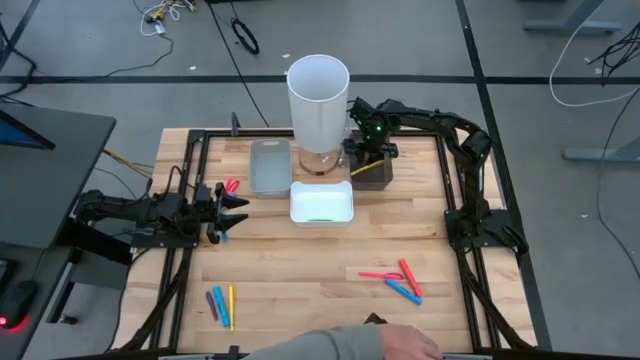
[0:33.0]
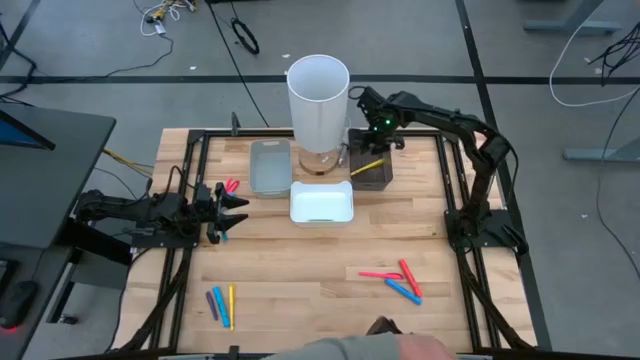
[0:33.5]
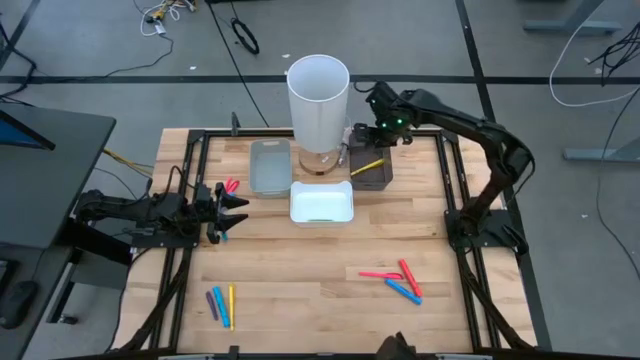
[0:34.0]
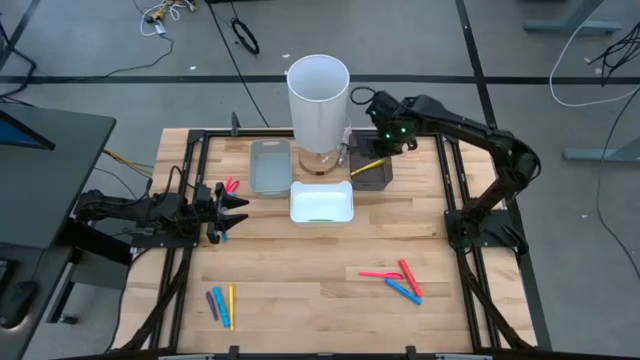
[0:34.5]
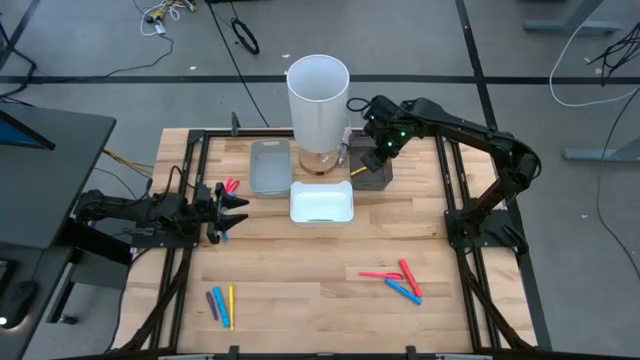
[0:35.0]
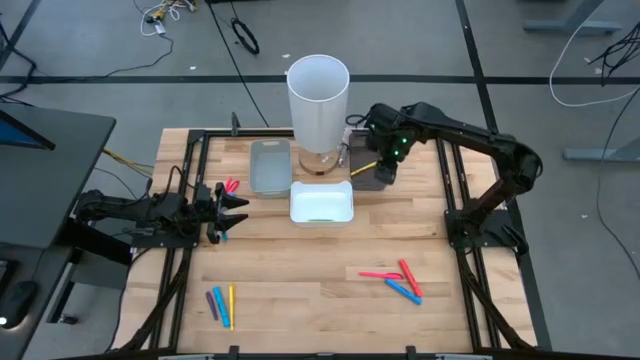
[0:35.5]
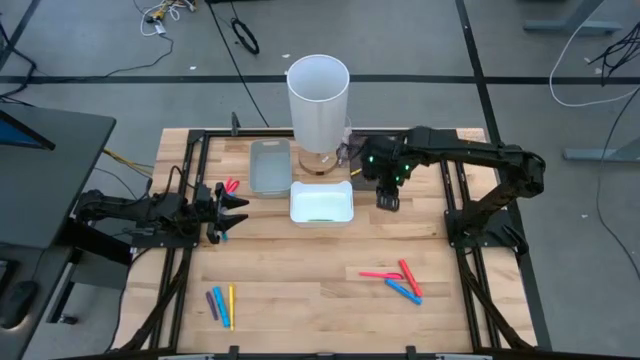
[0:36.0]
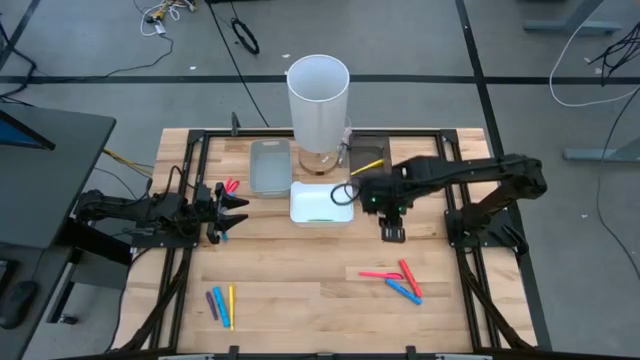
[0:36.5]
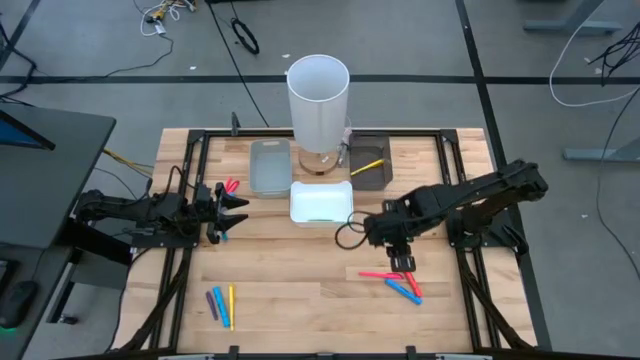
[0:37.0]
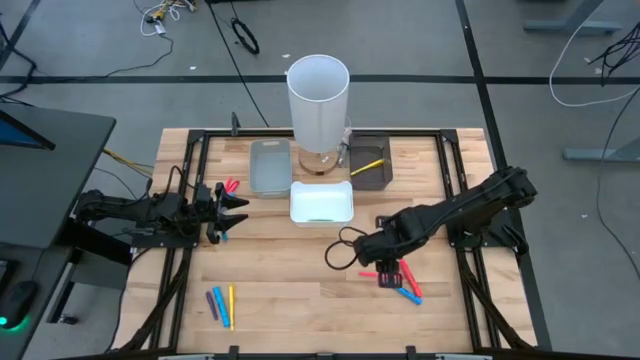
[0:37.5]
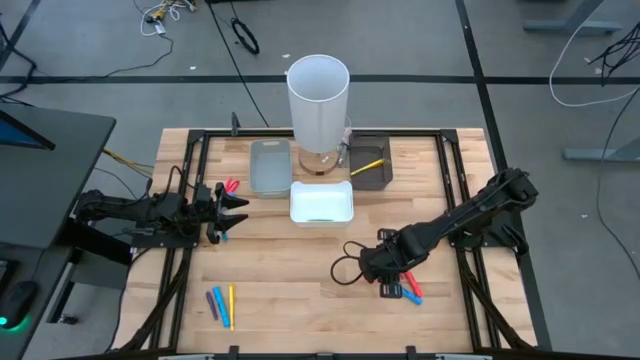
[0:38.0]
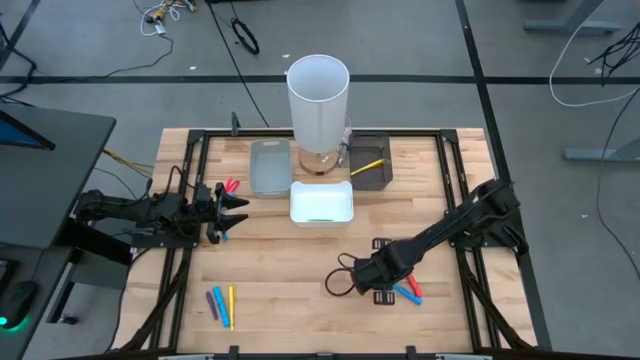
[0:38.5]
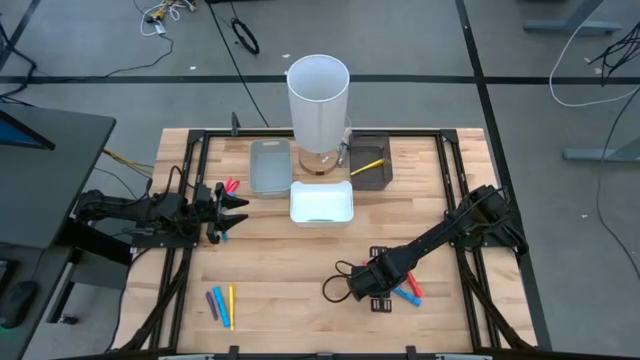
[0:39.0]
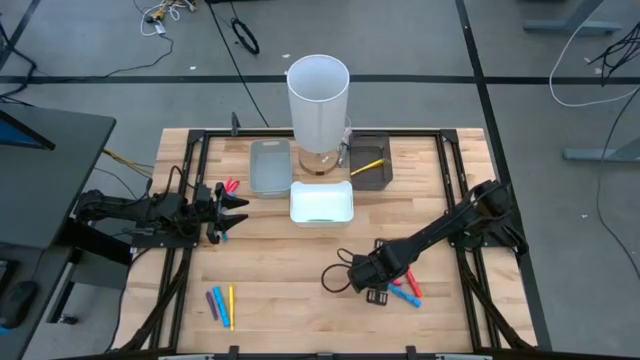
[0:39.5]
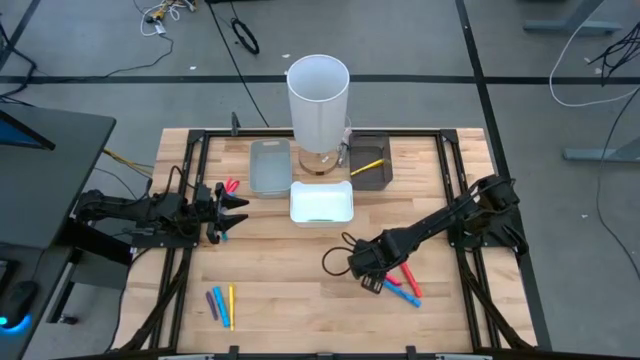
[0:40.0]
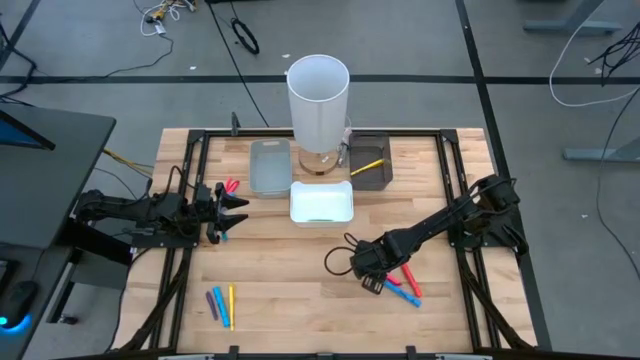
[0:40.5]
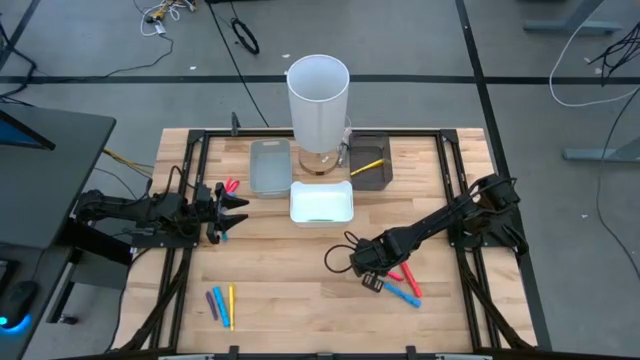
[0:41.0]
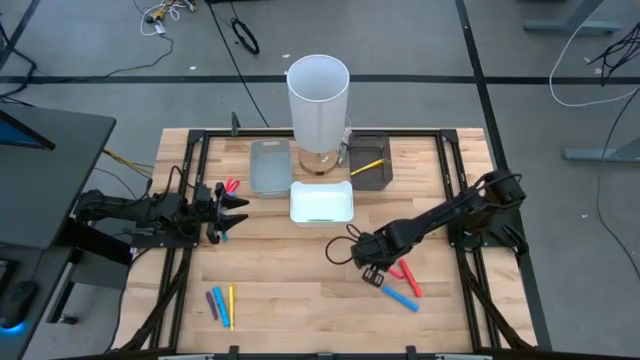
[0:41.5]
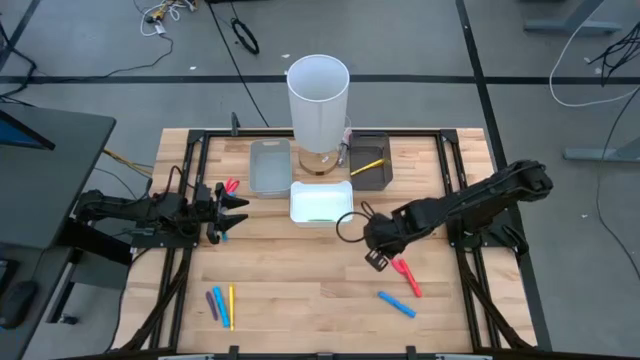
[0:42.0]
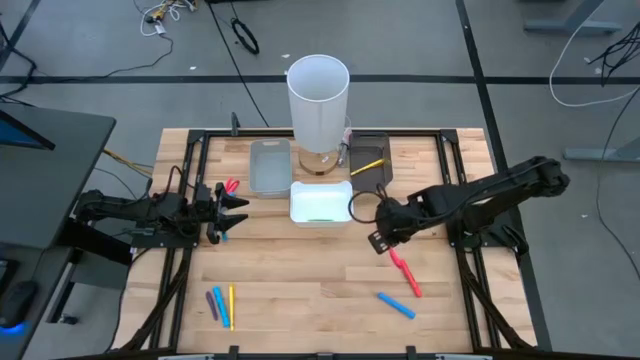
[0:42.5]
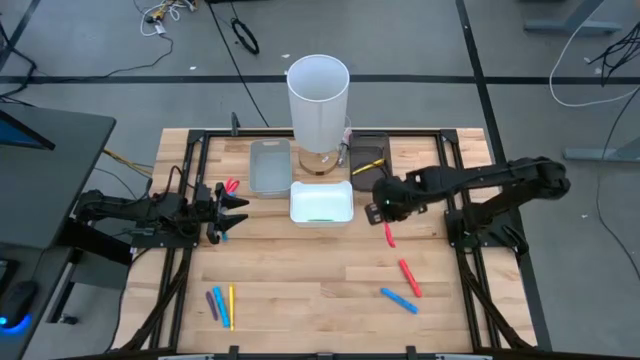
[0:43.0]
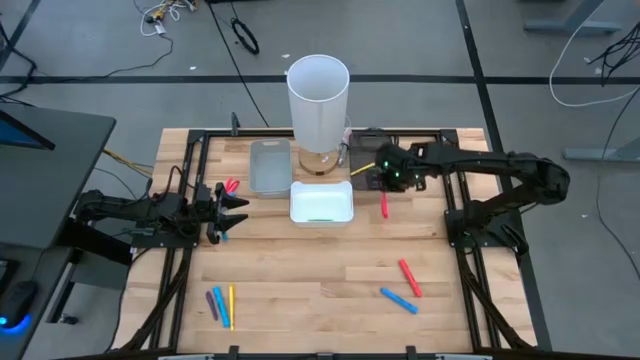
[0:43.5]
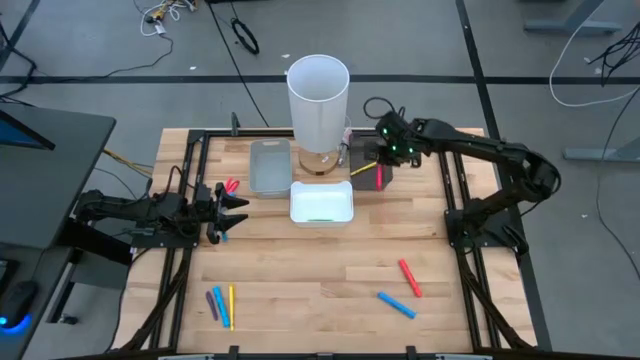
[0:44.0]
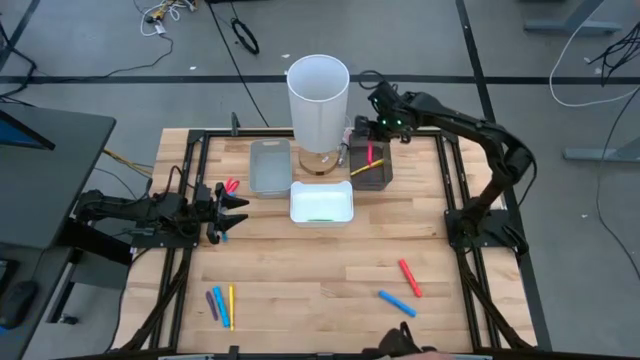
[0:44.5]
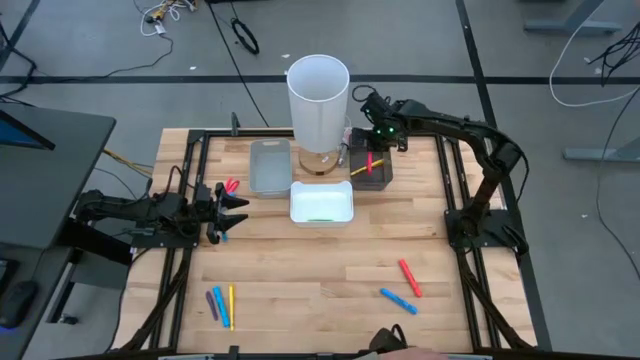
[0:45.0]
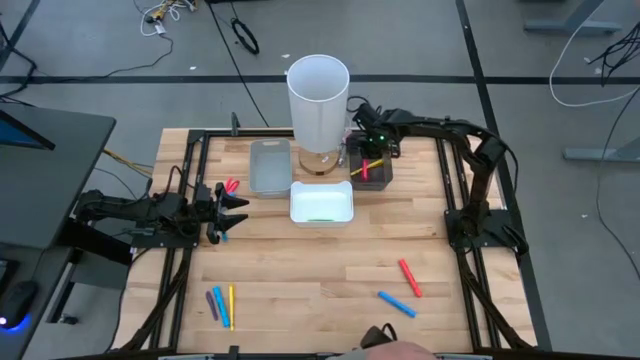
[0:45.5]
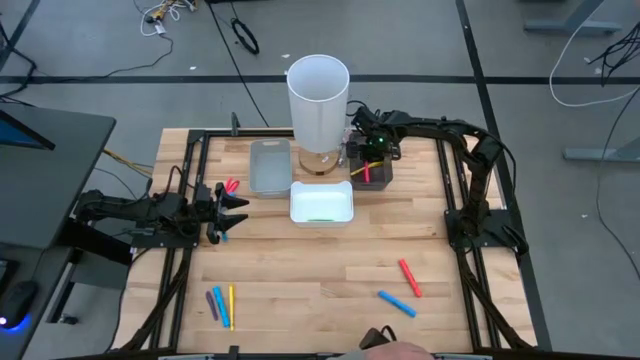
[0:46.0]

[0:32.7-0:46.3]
Task: Pick & Place Markers
Put the bottom right pink marker pen into the black bin

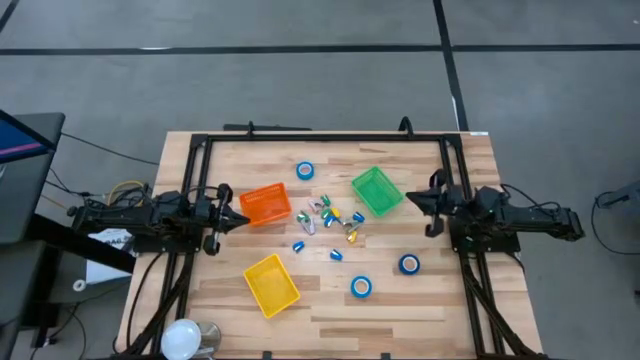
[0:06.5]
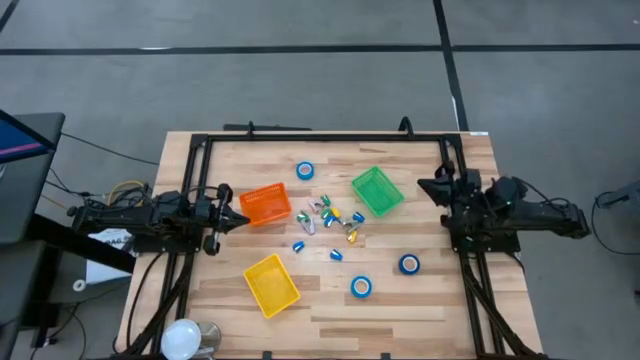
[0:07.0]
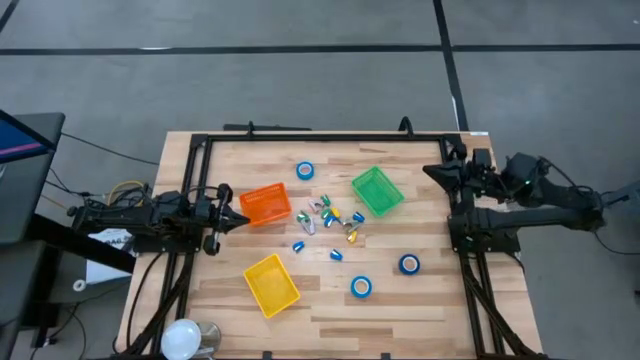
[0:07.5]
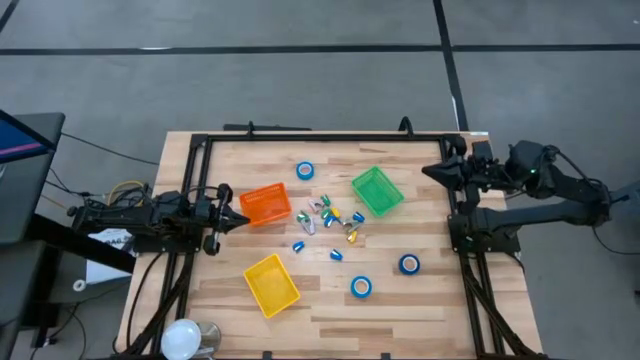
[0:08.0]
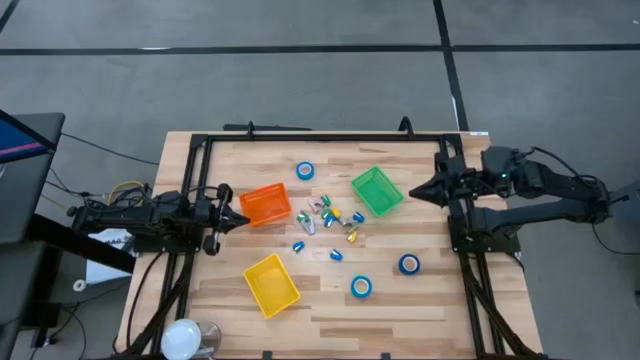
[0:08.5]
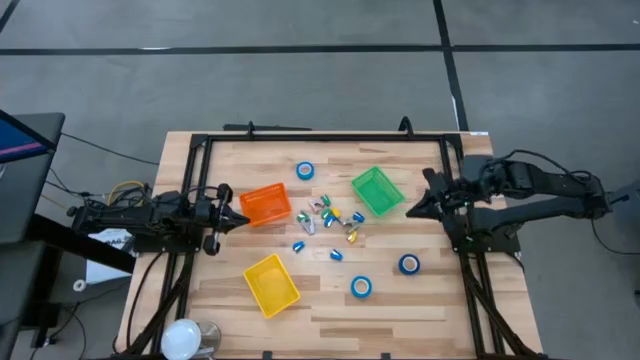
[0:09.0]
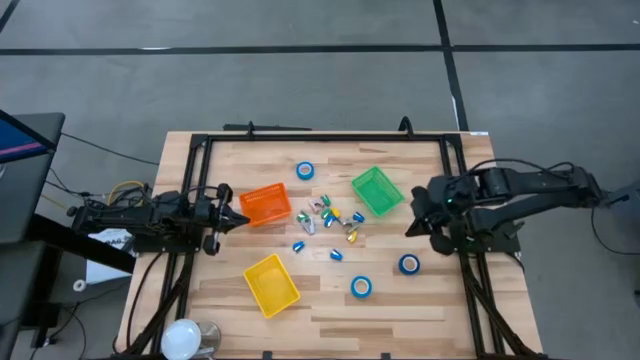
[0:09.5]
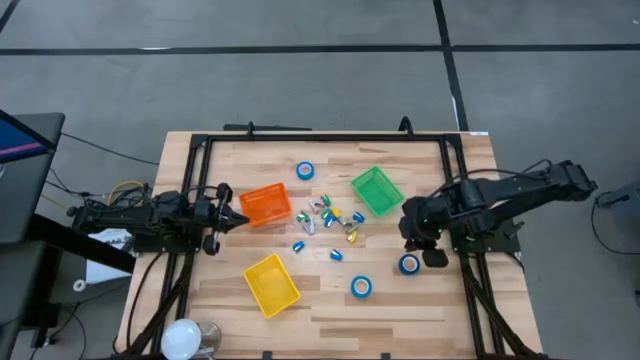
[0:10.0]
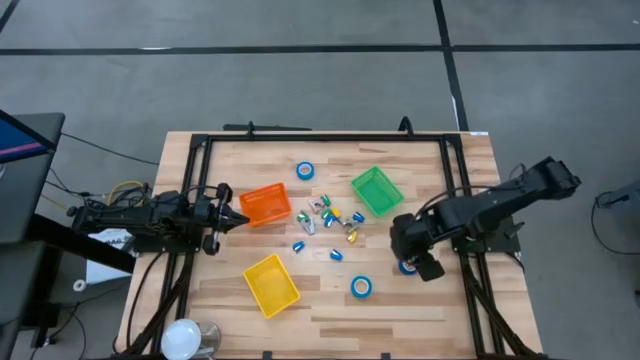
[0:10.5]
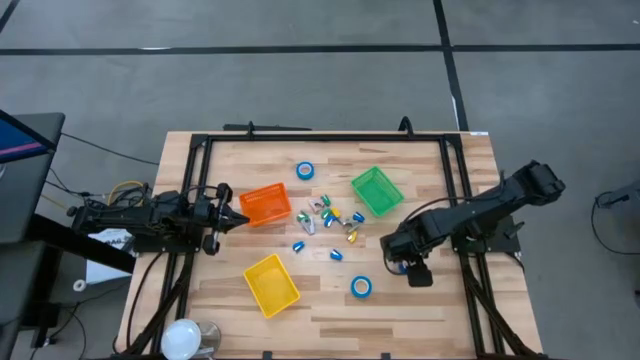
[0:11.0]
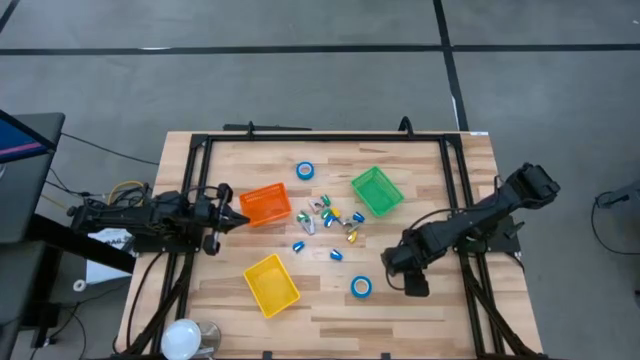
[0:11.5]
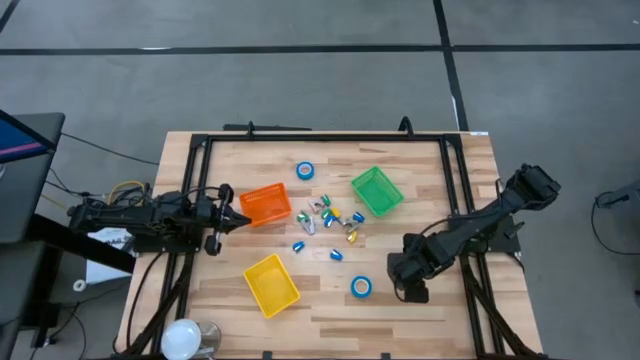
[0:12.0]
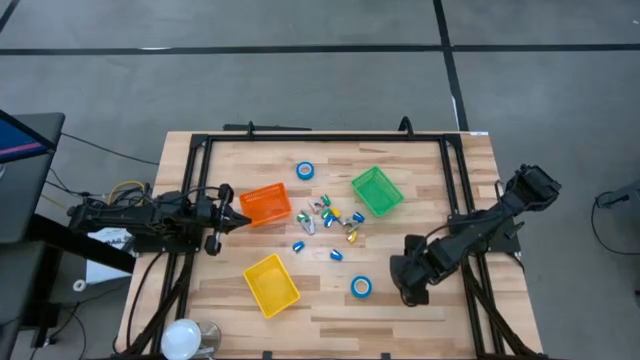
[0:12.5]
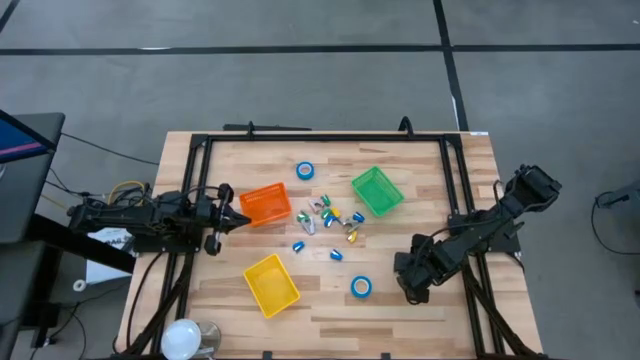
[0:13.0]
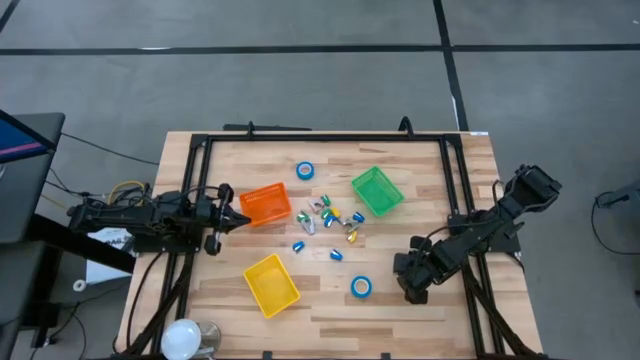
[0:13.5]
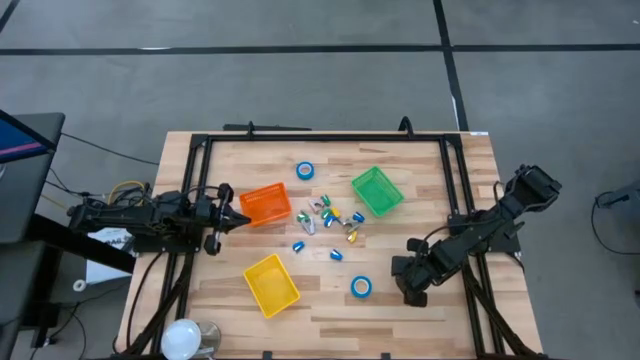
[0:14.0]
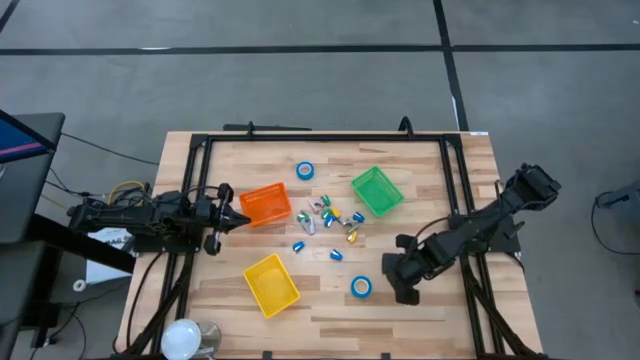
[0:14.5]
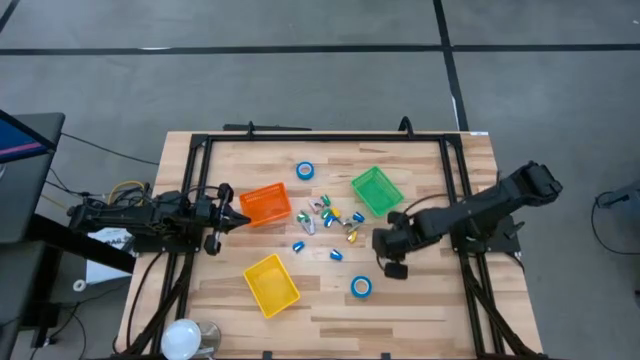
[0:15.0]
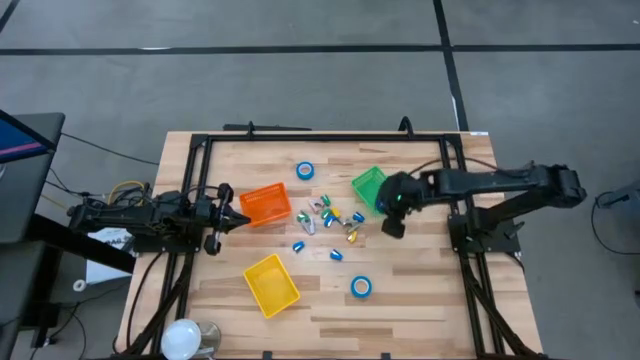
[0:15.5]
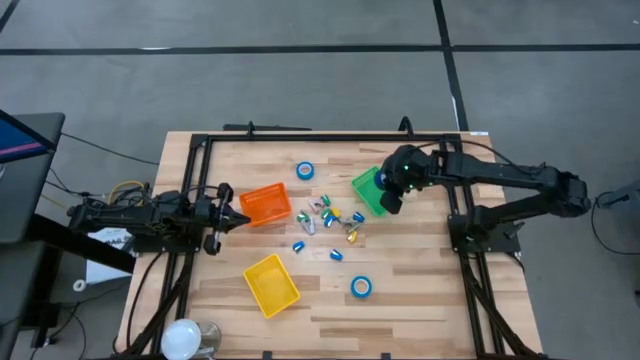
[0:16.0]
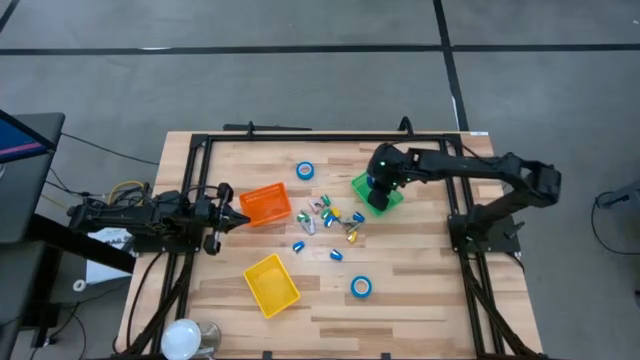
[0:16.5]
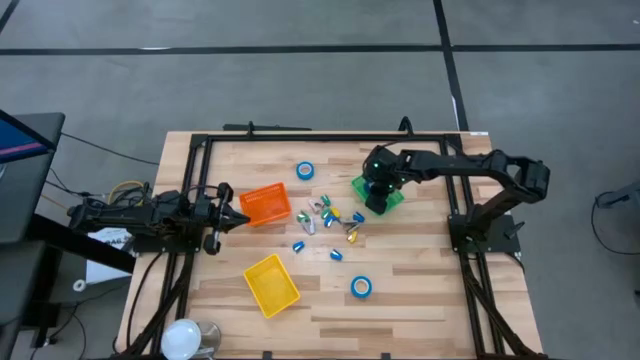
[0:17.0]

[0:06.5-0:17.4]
Task: Pick and place Stapler, Stapler remover, tape
Put the blue tape into the green basket
